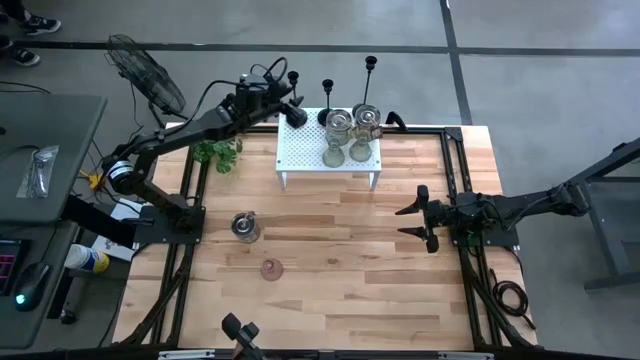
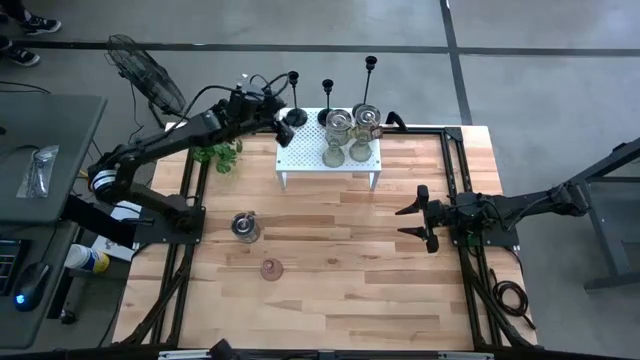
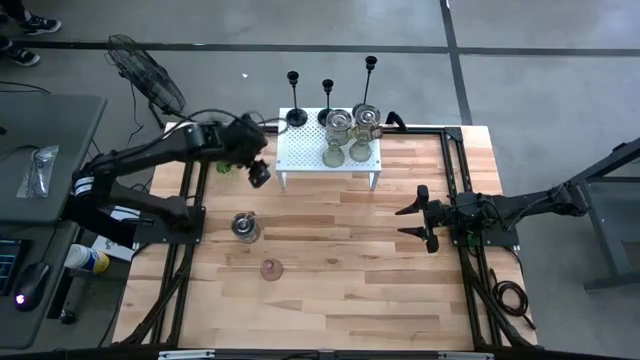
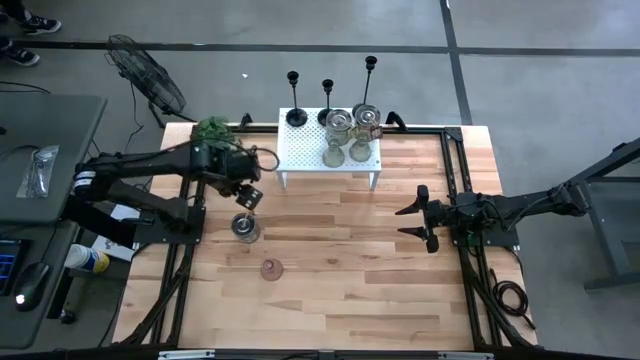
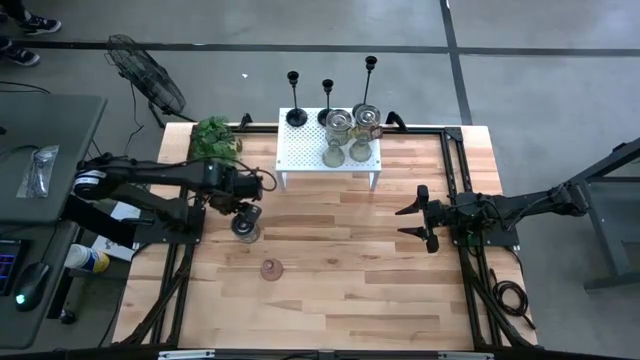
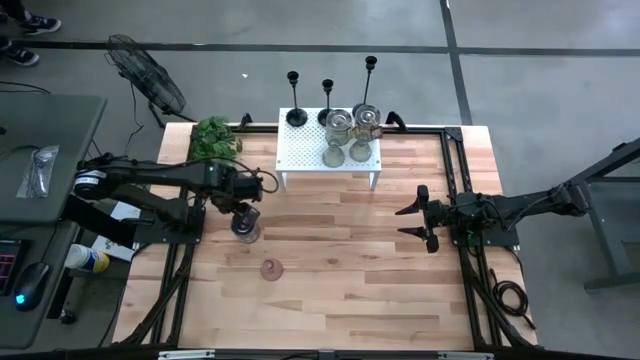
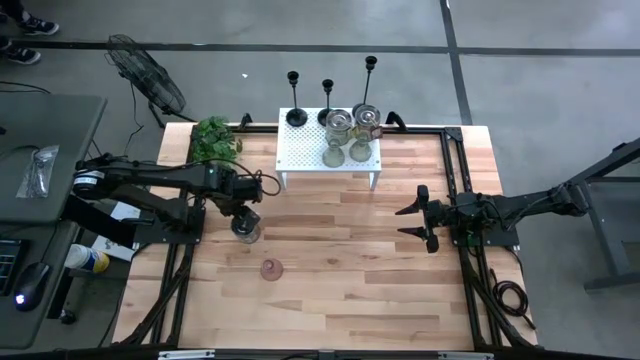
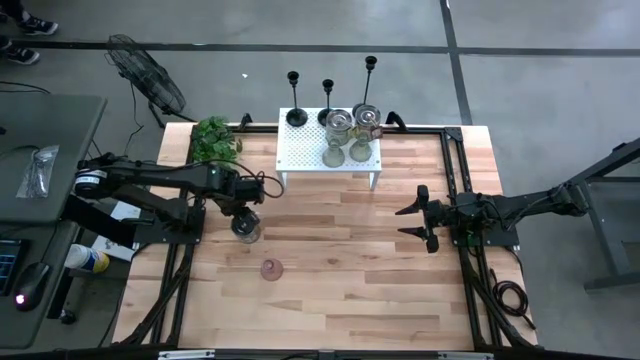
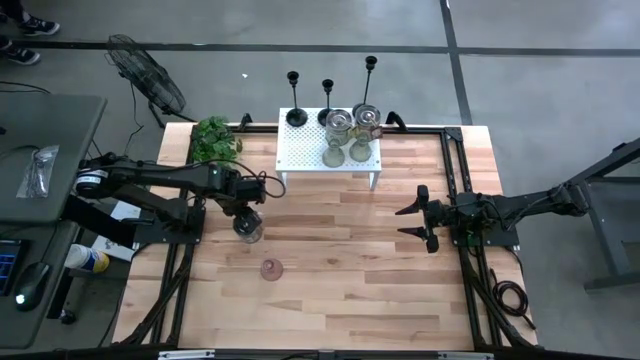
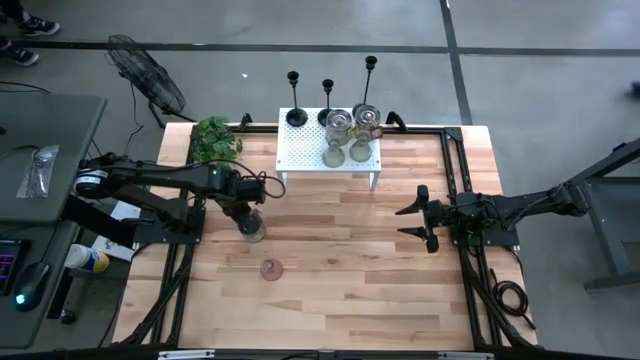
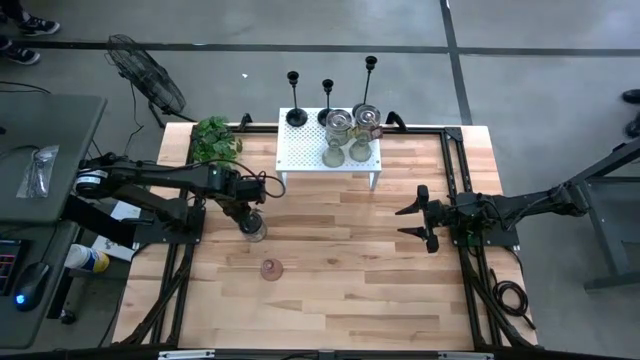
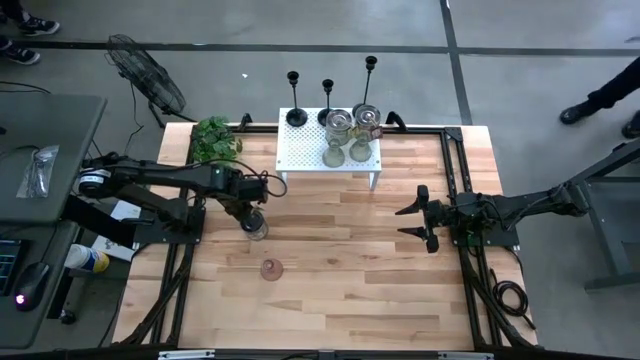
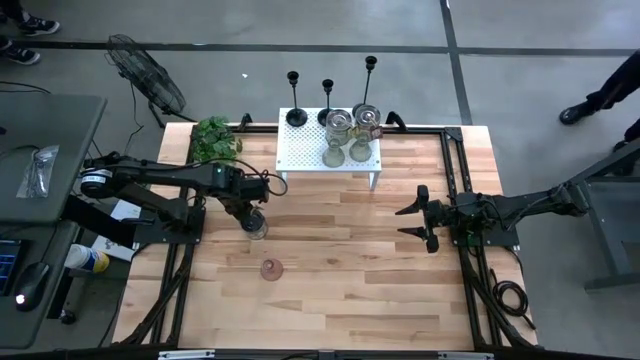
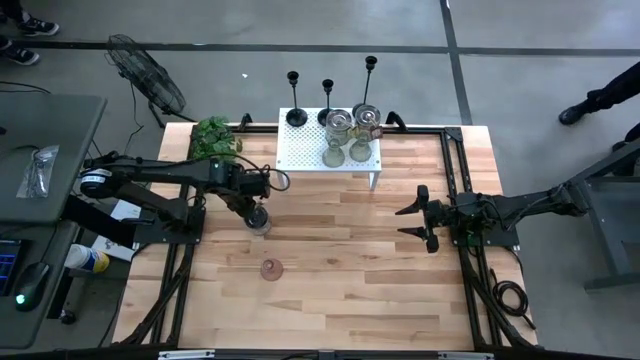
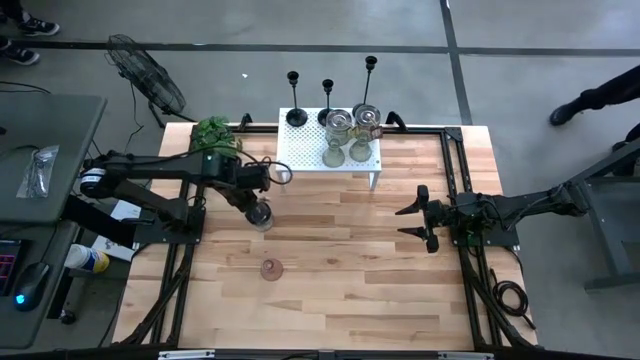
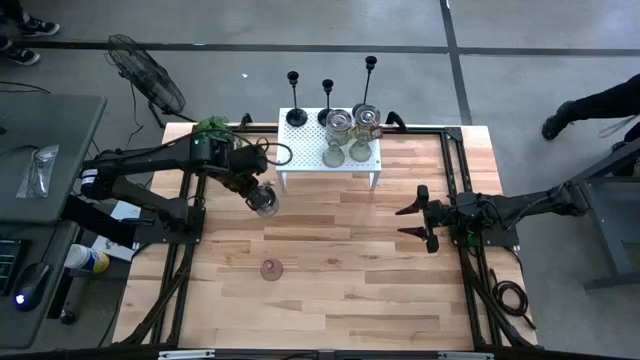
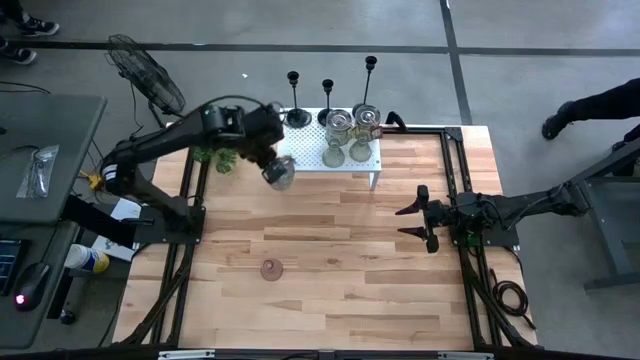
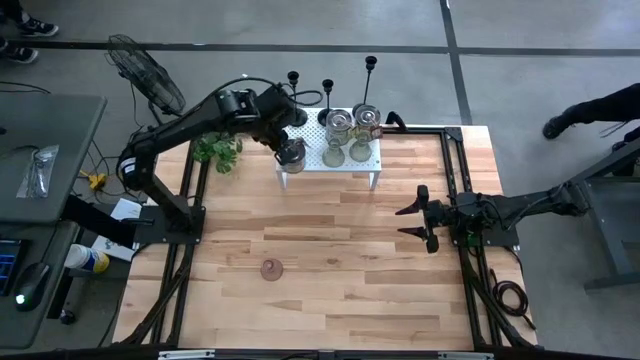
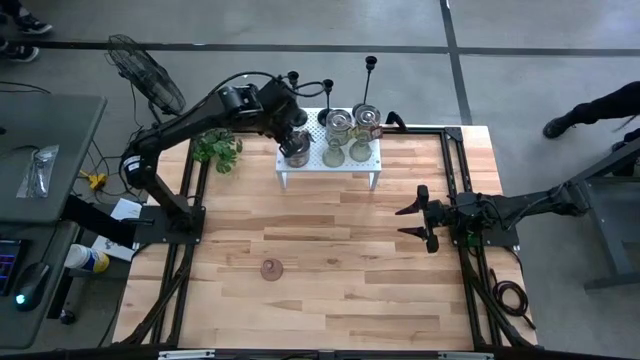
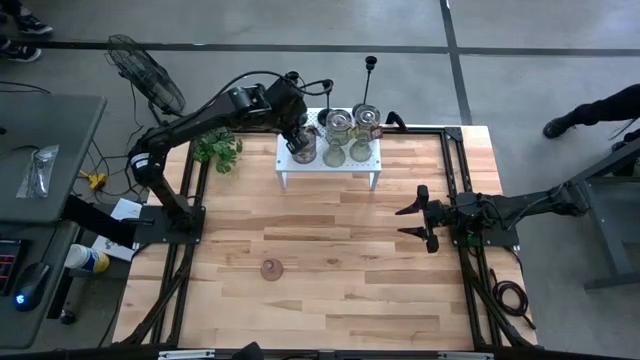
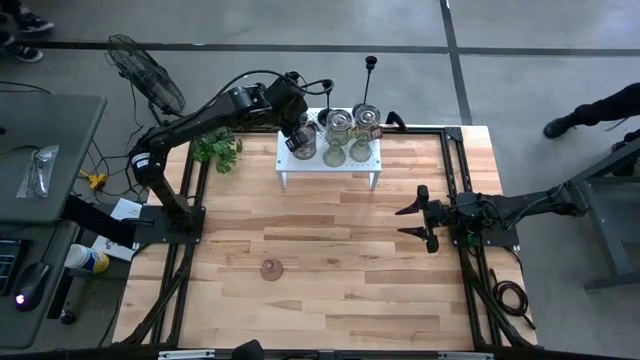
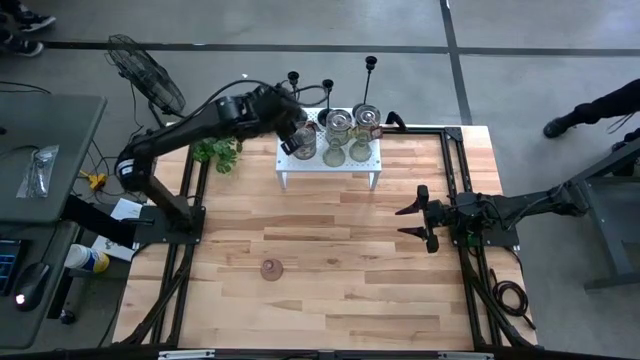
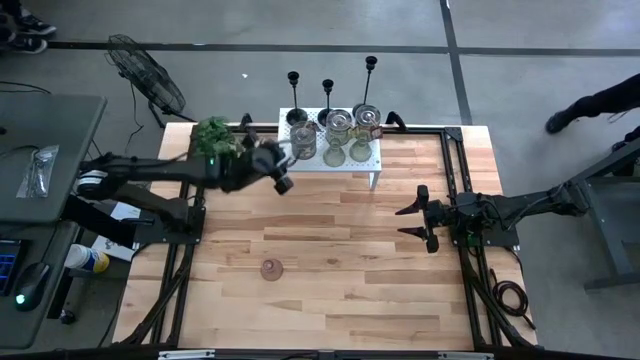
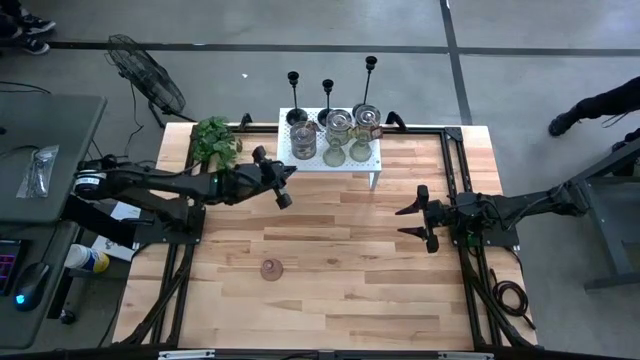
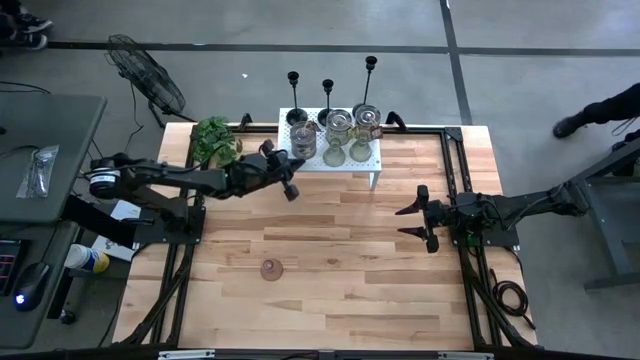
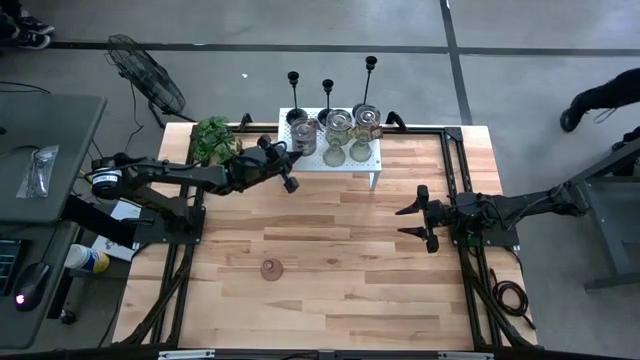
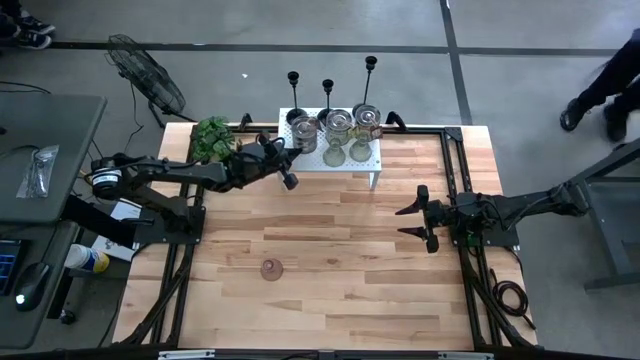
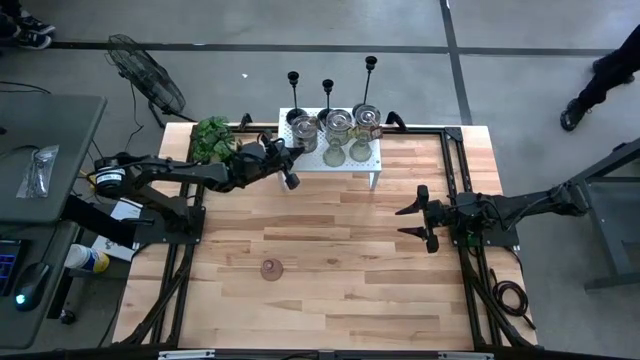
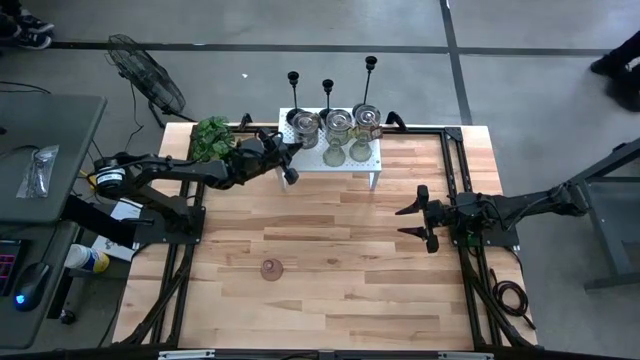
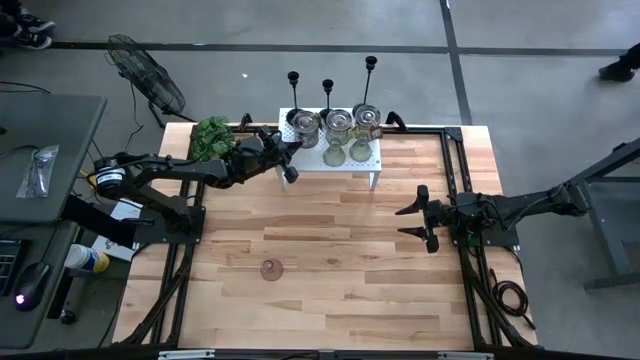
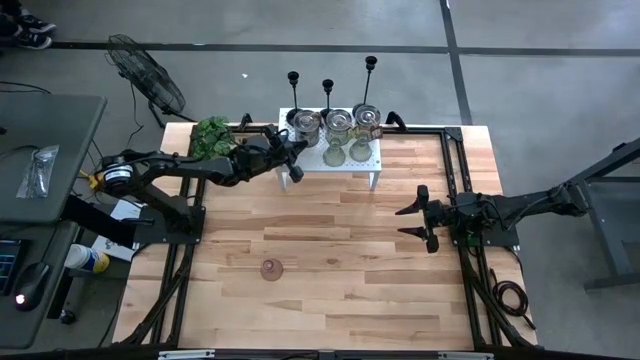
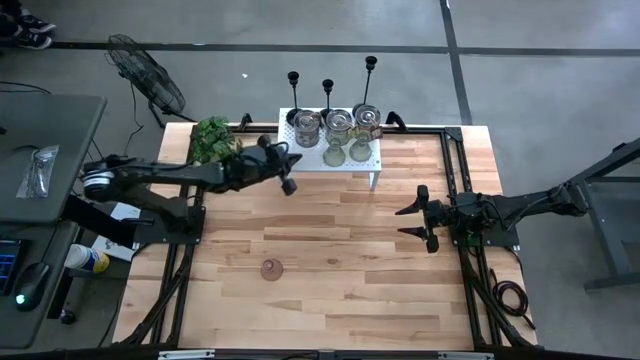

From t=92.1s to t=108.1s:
Task: Pick & Place candle stick holders
Put the brown scented candle on the shelf

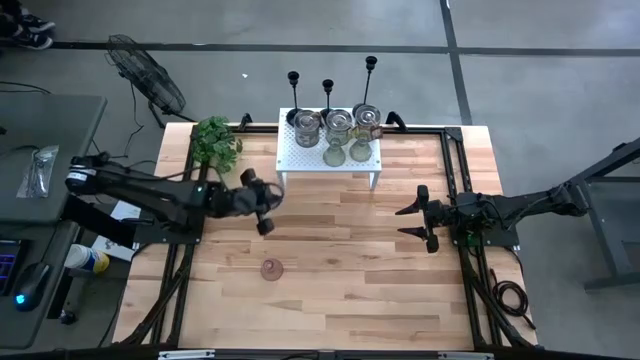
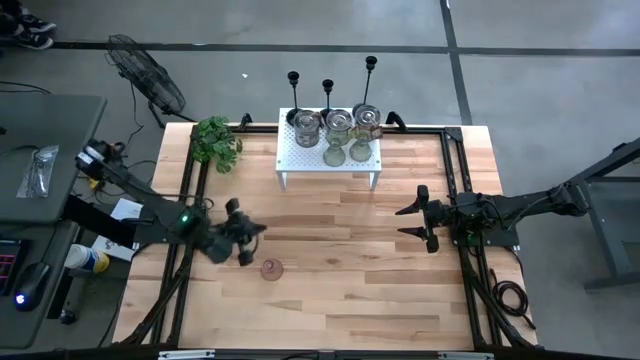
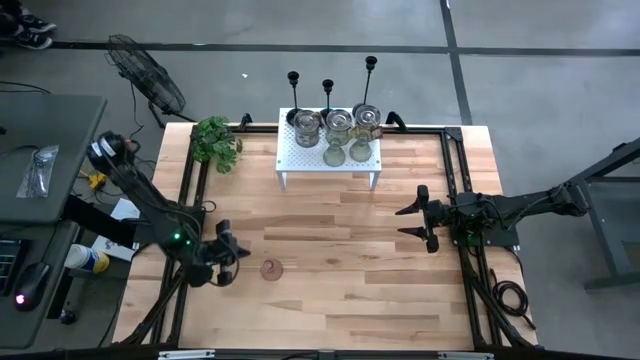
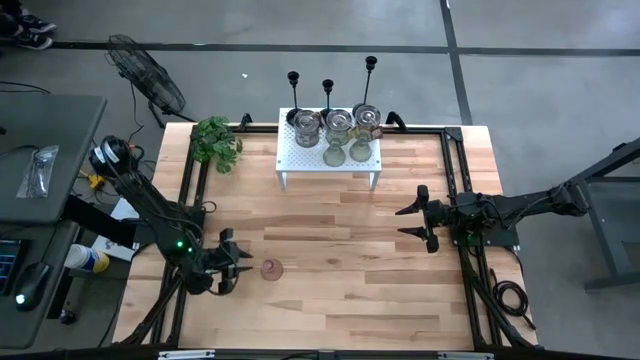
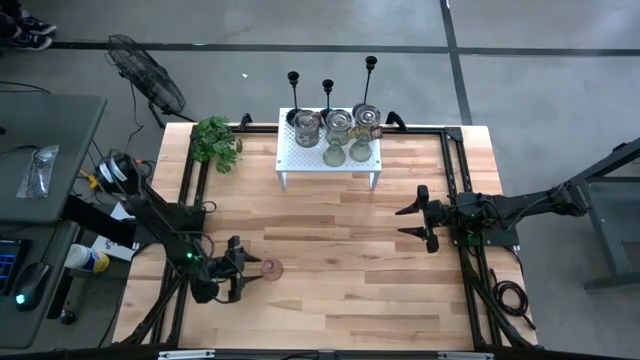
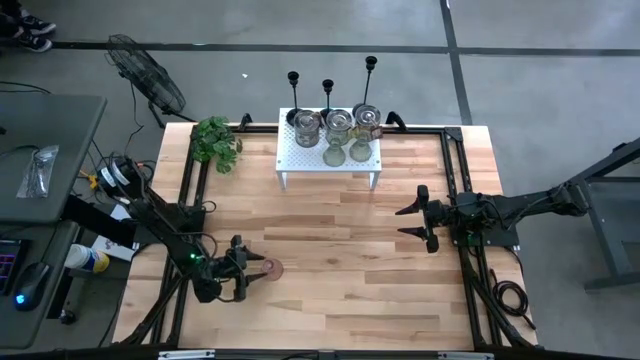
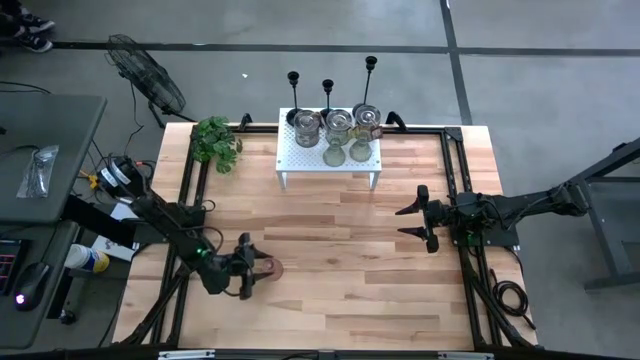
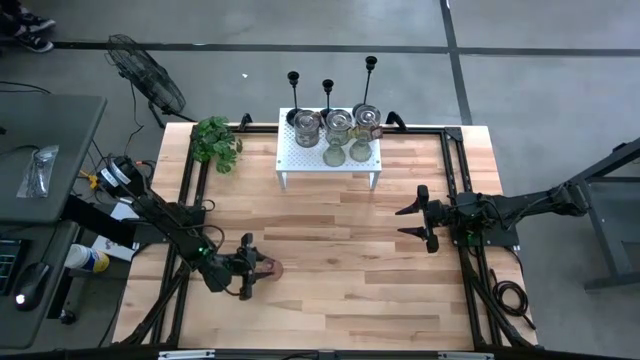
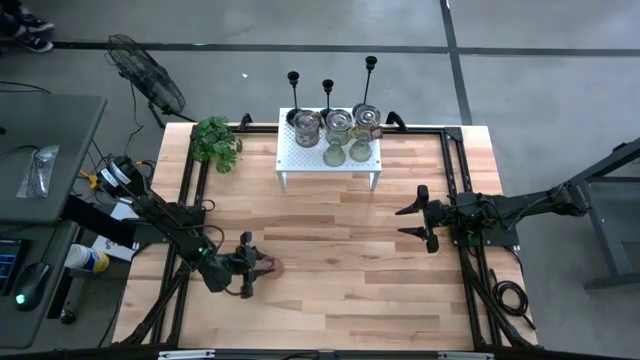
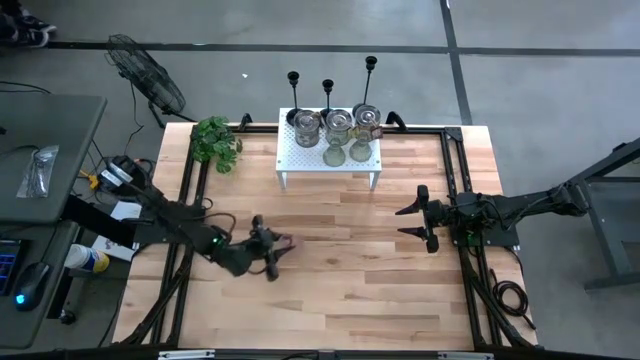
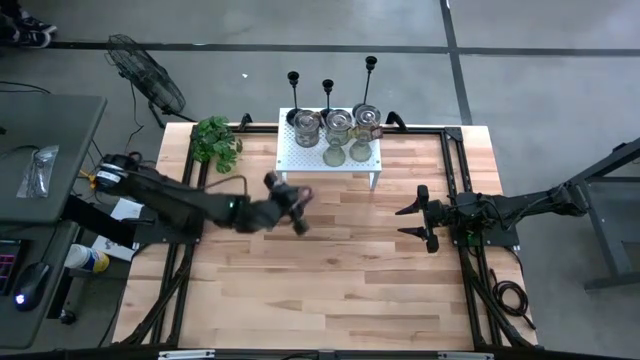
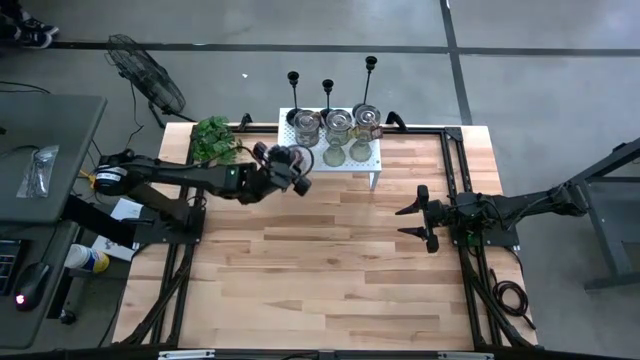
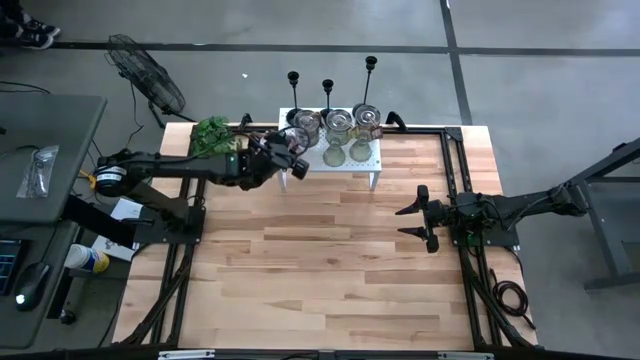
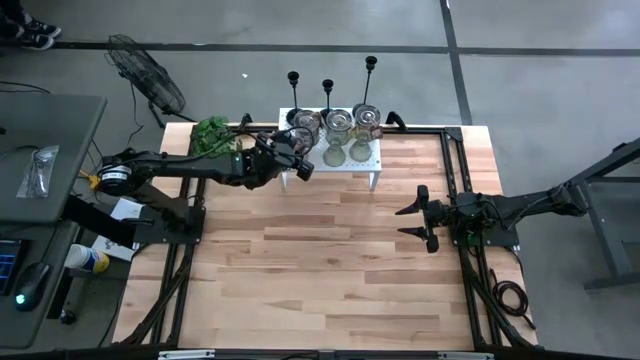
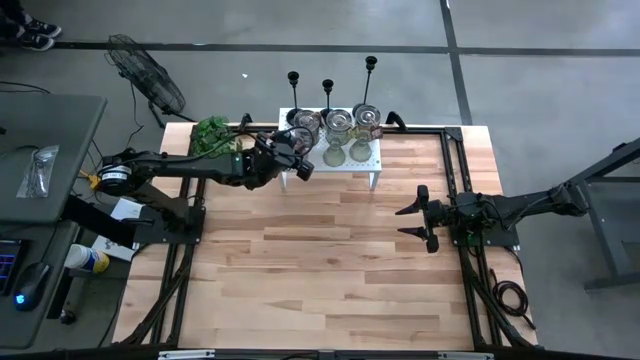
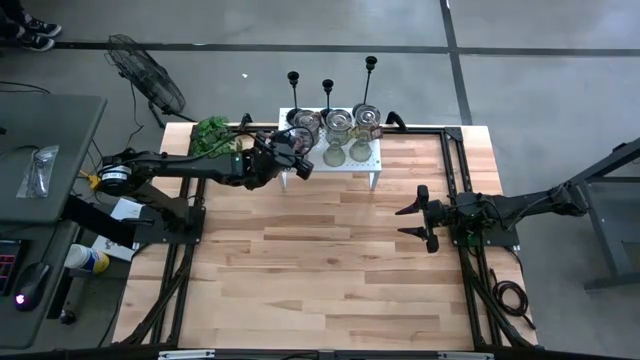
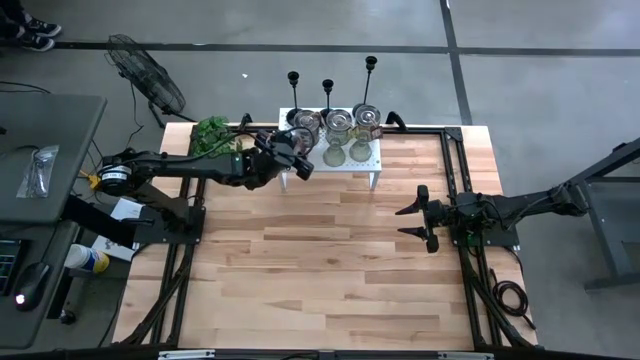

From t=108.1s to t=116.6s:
Put the pink glass candle holder on the shelf
